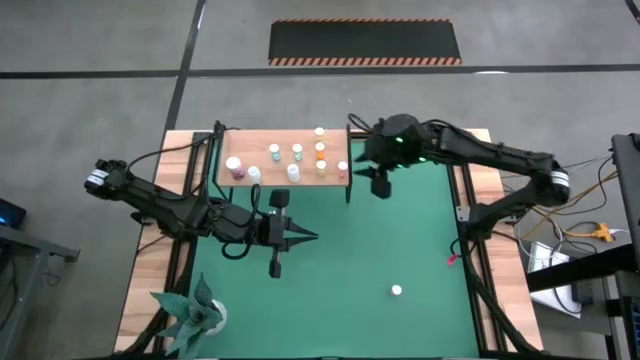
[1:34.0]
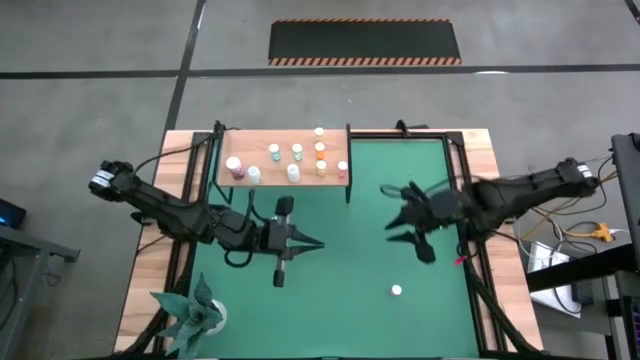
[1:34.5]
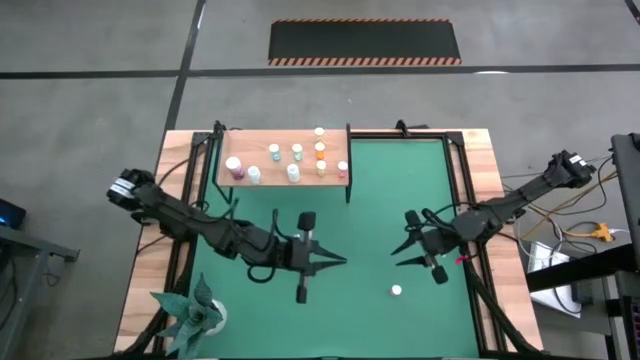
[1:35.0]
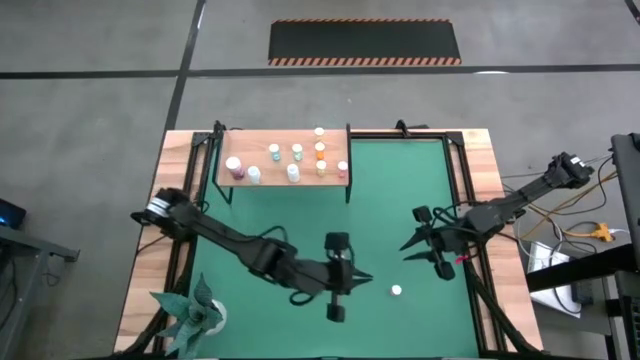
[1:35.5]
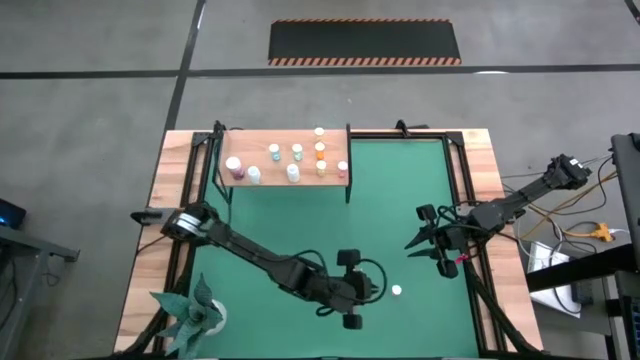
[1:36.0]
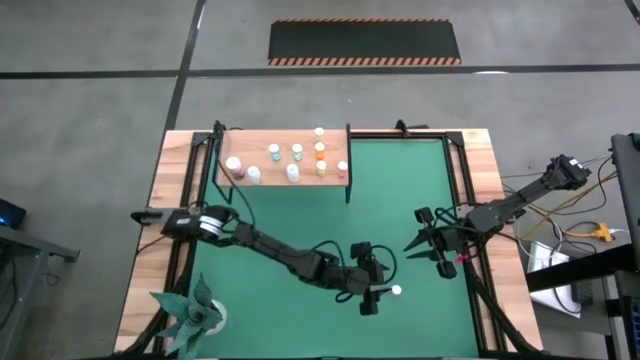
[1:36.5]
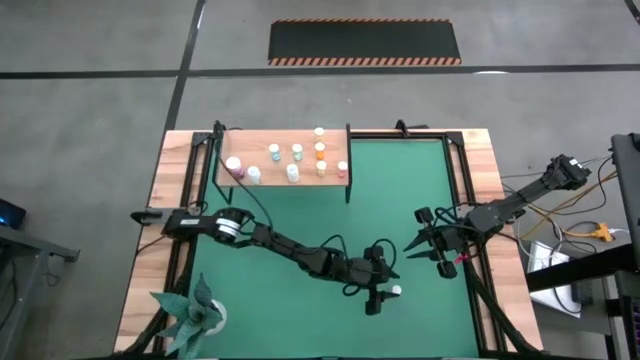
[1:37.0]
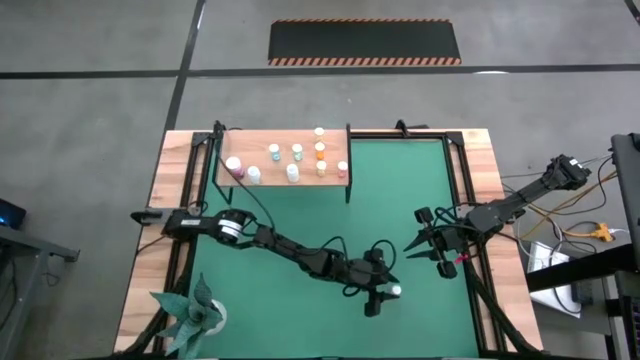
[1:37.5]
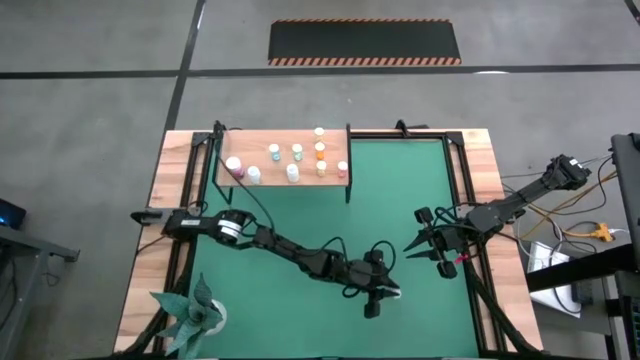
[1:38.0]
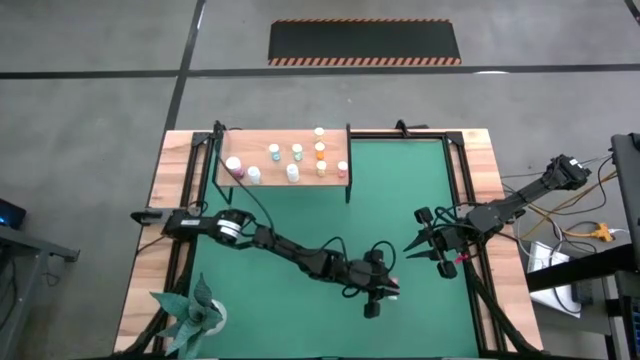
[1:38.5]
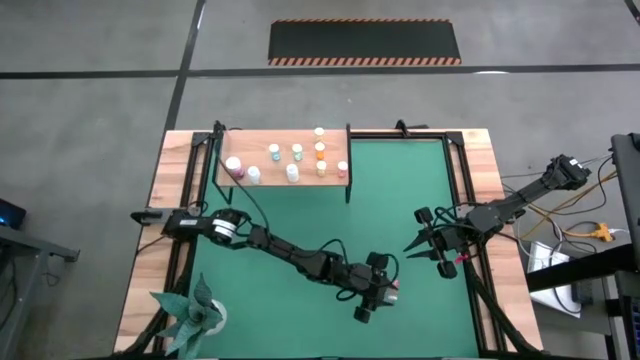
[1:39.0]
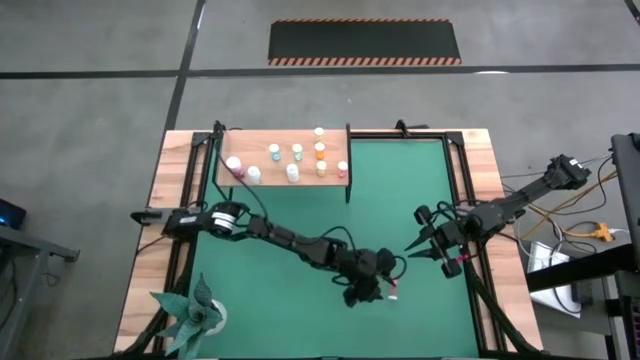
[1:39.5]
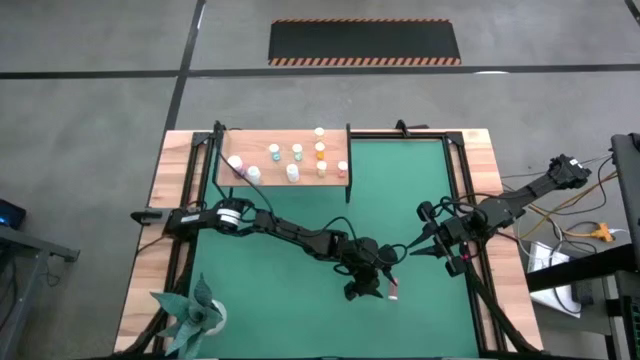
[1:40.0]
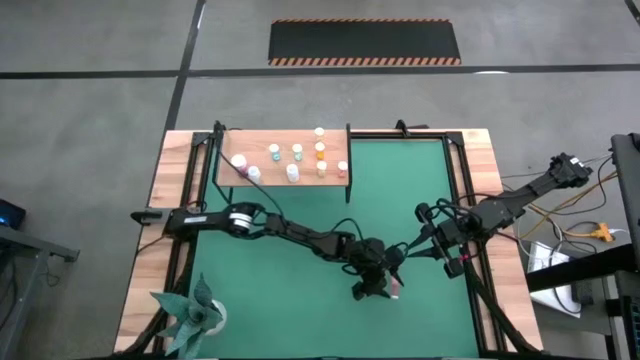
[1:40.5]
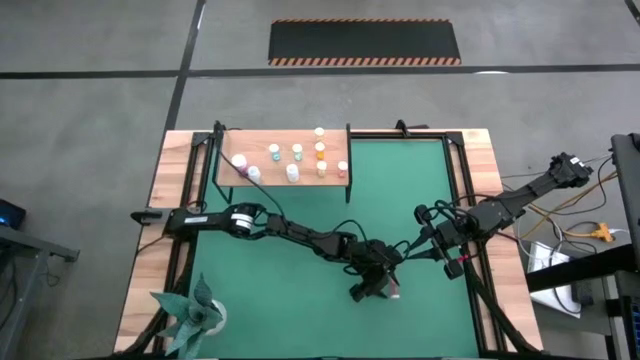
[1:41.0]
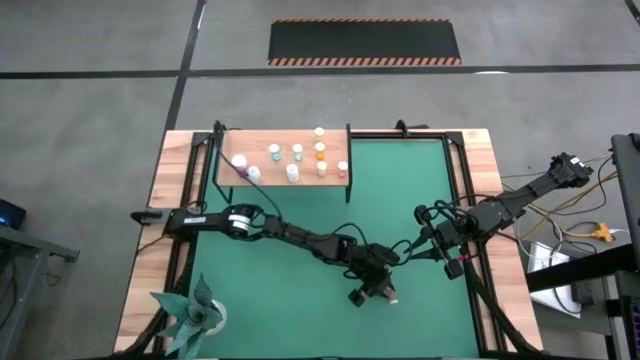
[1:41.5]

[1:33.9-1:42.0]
Task: Pick and place medicine bottles onto shelf by color
Put the pink pill bottle on the shelf

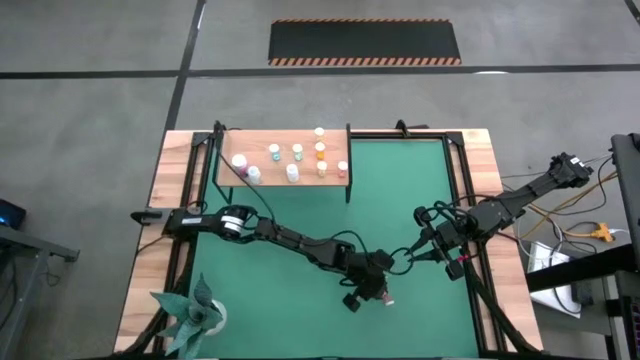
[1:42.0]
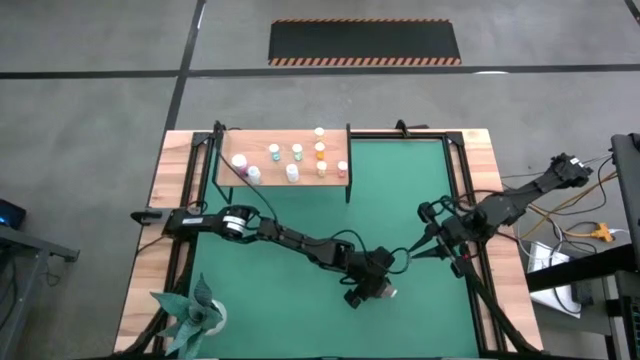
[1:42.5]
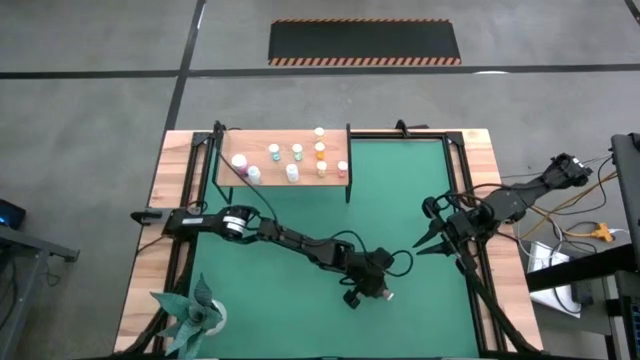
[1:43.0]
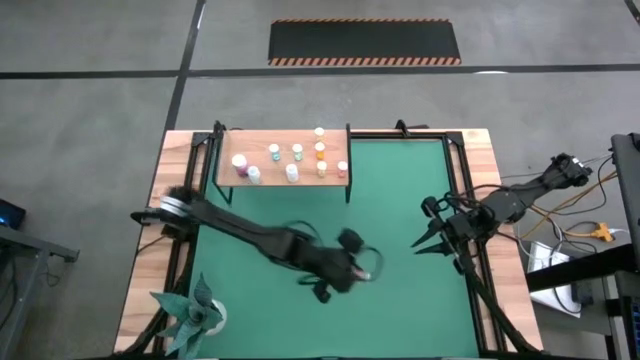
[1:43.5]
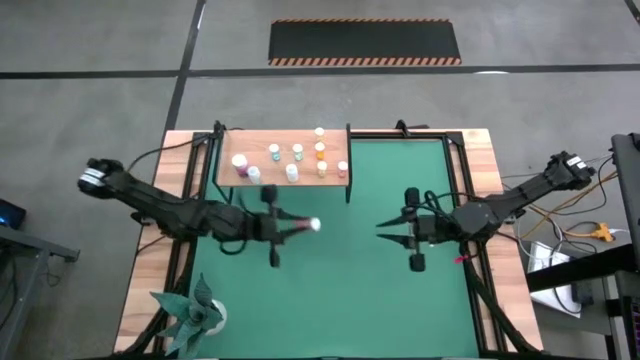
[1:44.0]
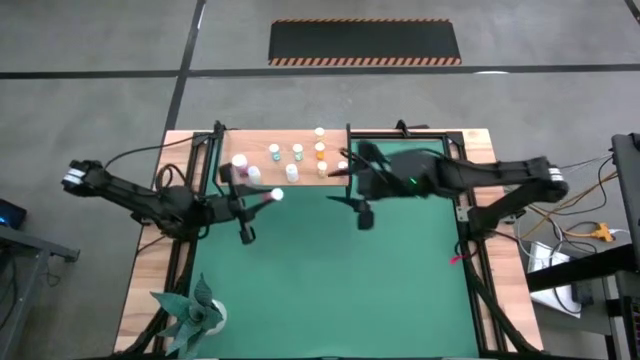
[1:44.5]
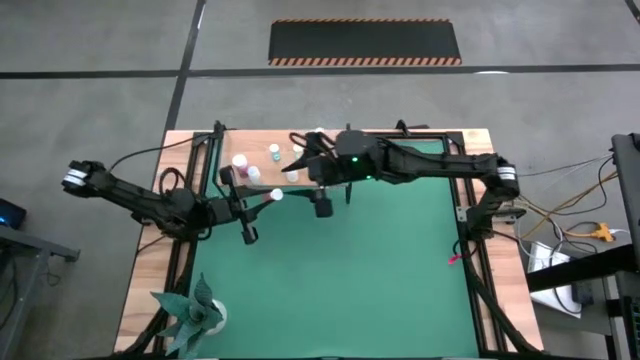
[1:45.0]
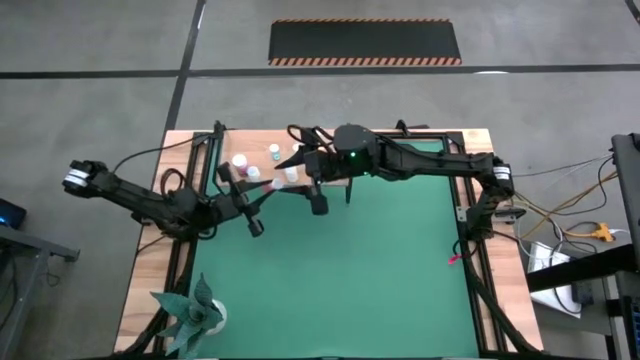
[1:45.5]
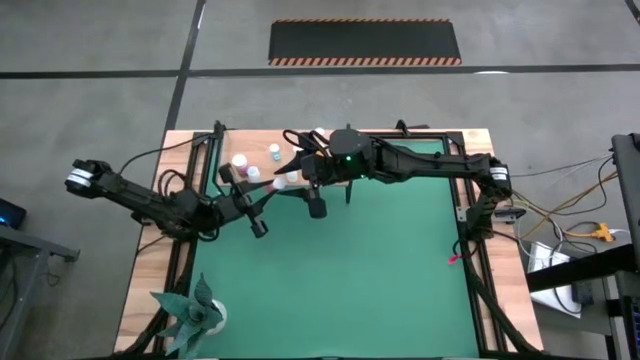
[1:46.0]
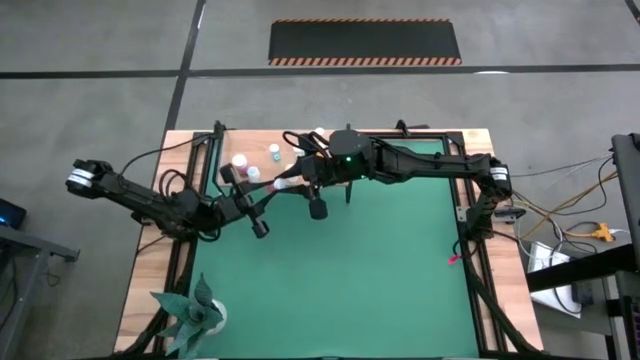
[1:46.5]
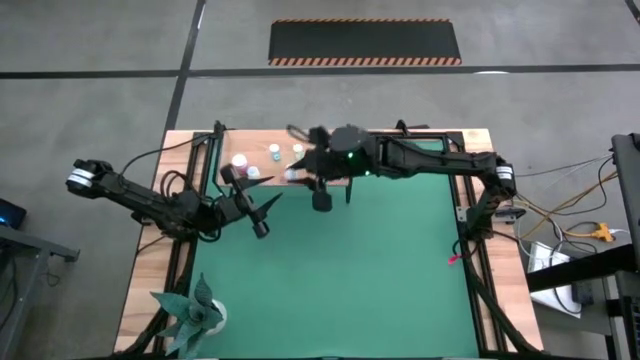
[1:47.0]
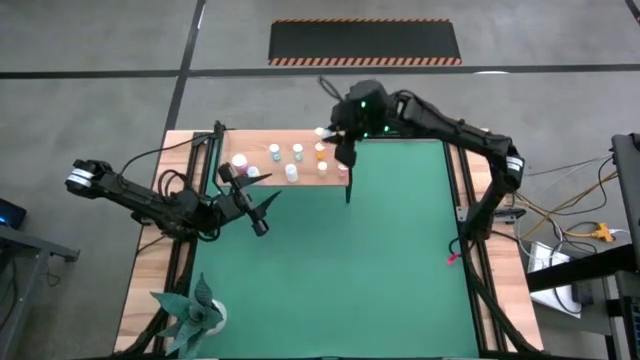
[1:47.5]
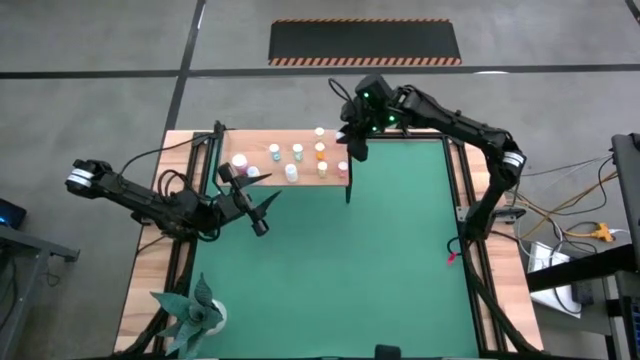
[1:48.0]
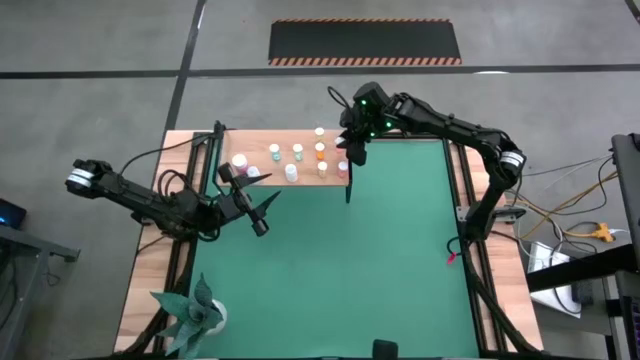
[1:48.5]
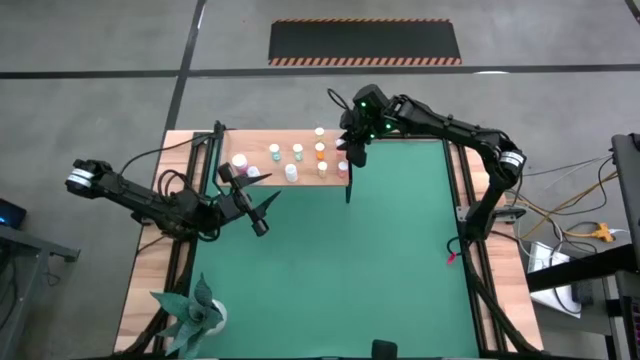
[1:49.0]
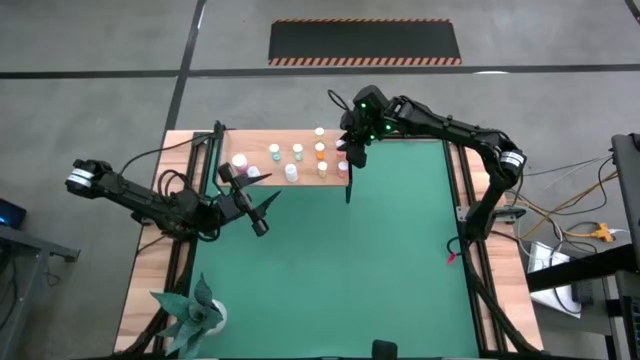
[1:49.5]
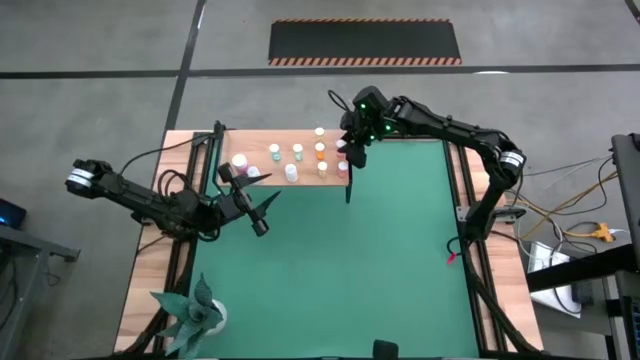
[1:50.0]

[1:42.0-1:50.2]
Put the pink pill bottle on the shelf

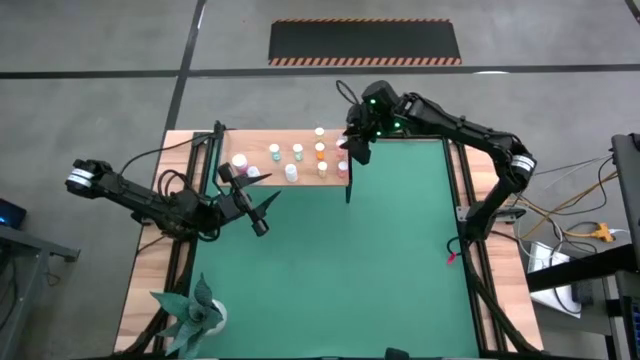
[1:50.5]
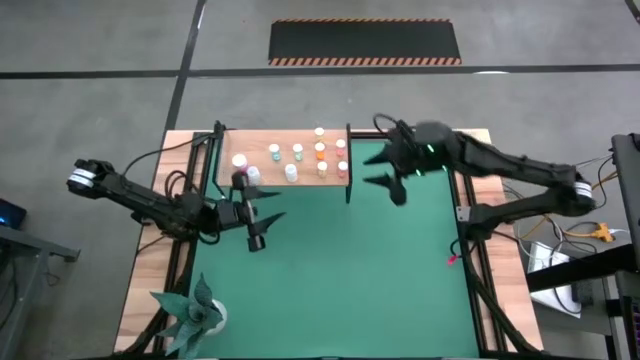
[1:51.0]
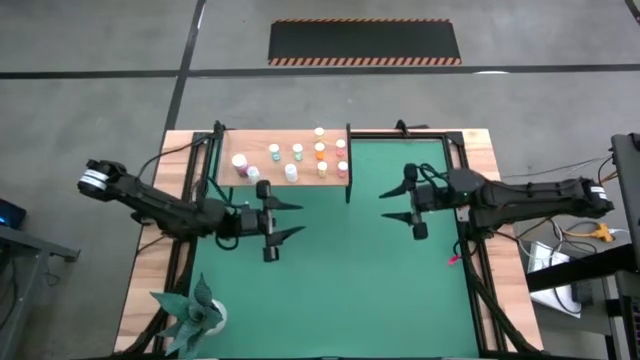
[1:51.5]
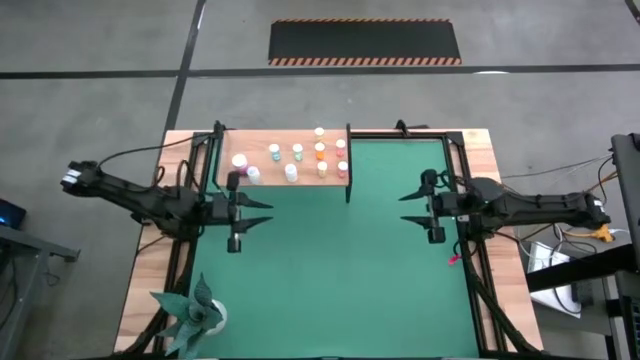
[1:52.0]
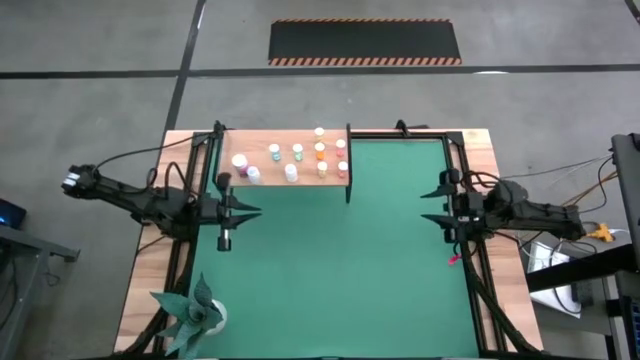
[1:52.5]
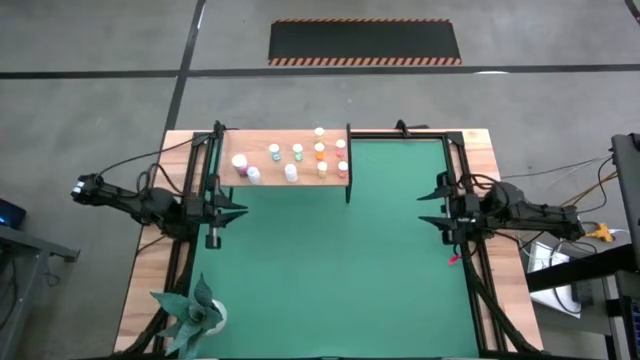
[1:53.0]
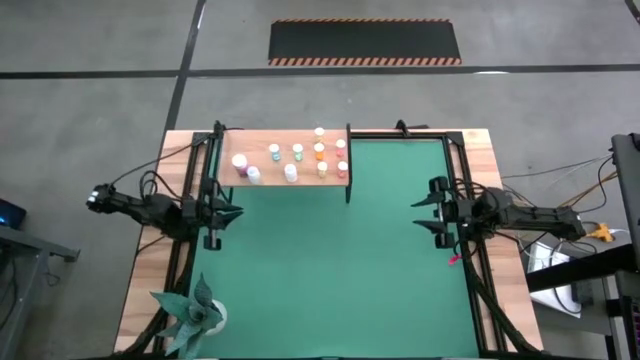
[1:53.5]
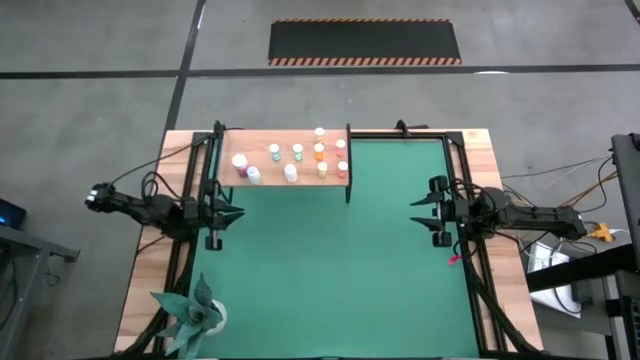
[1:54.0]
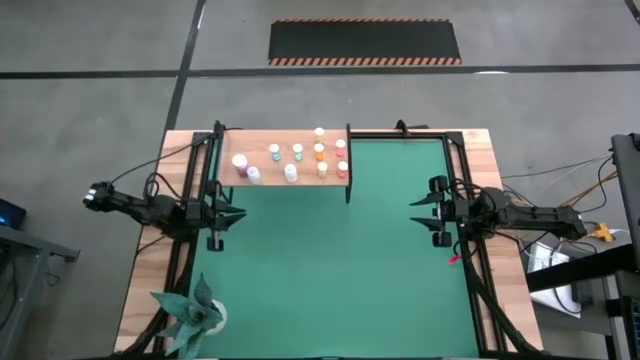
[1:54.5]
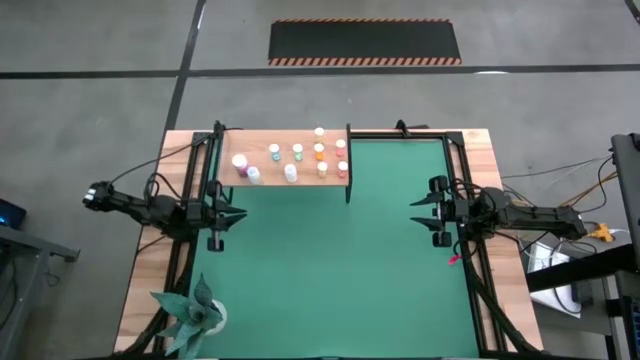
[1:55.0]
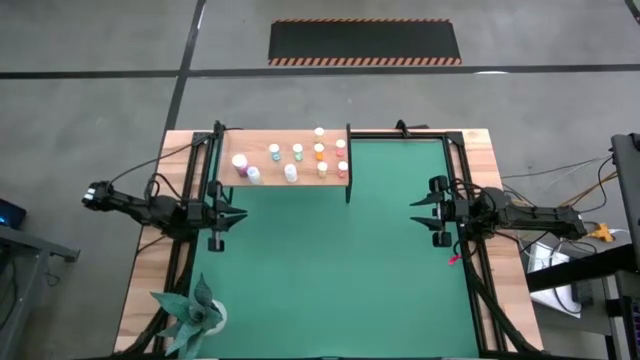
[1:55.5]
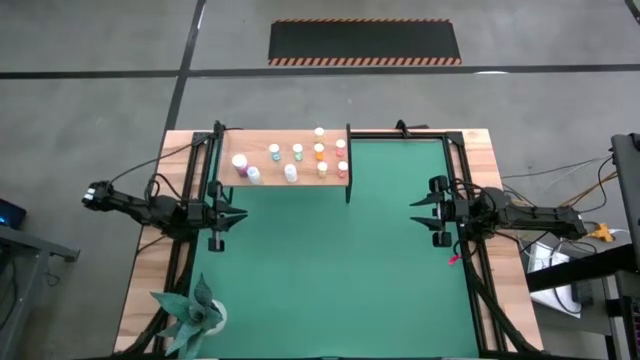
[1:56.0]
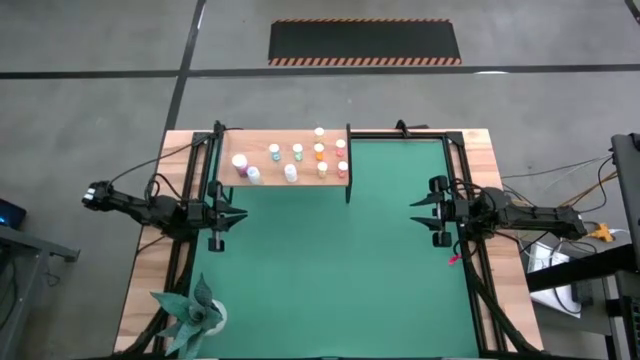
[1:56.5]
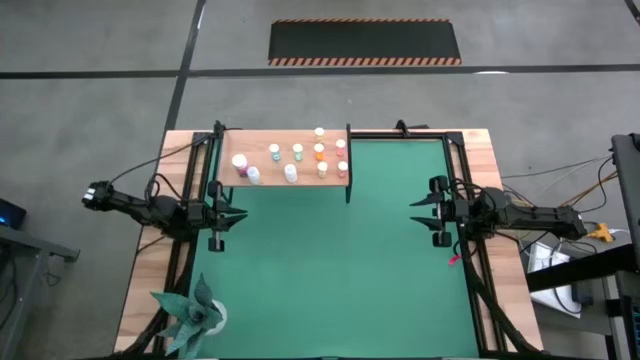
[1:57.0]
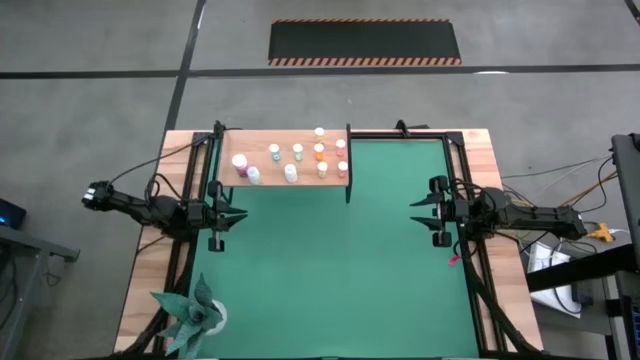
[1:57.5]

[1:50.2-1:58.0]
Return to Home Position
